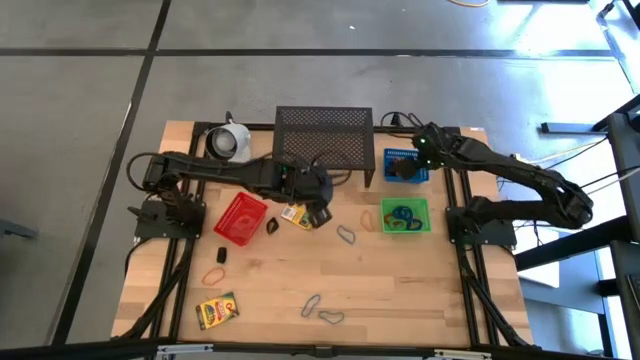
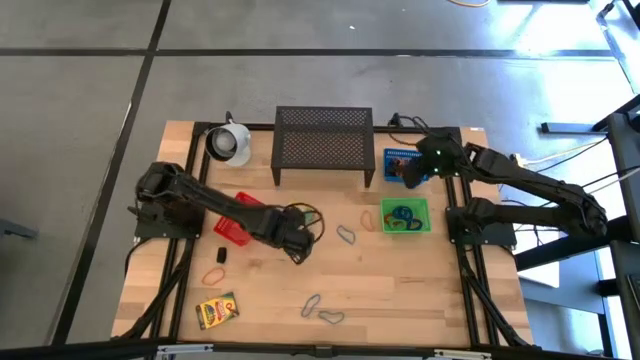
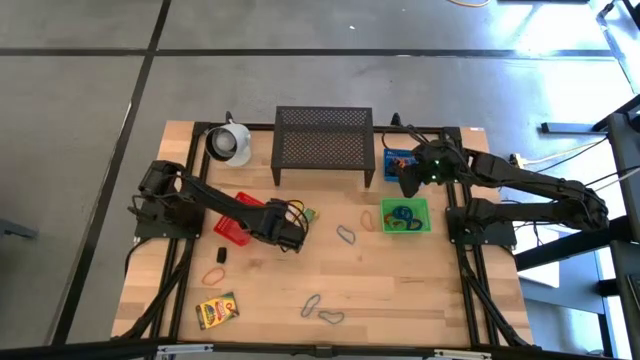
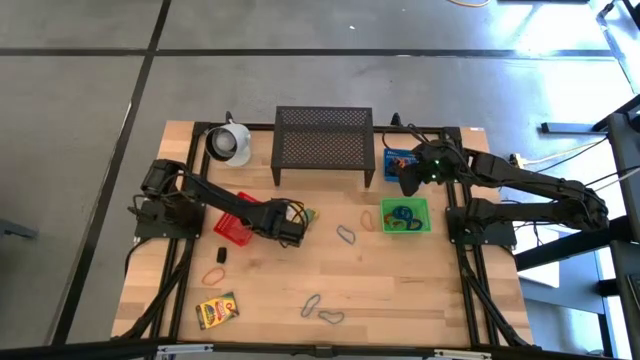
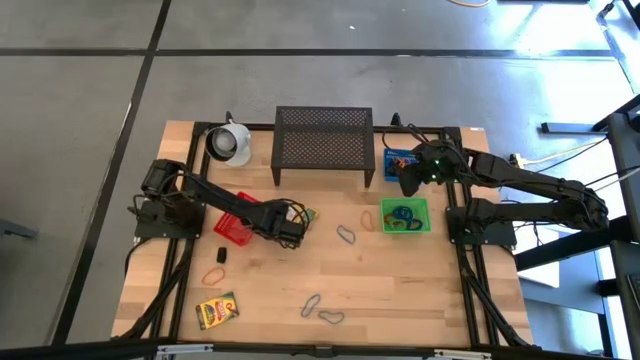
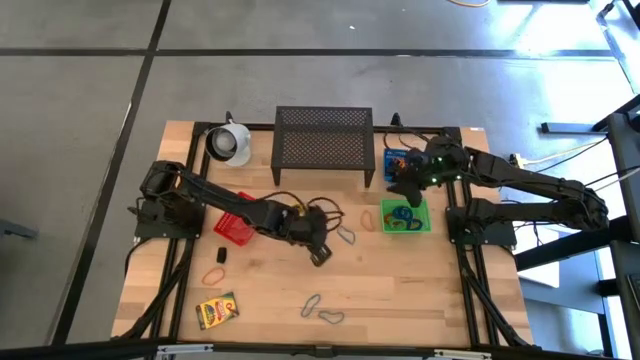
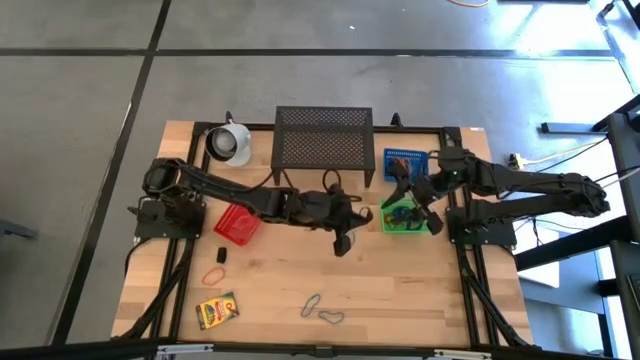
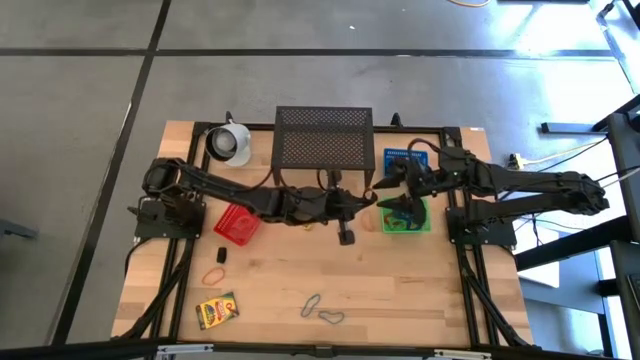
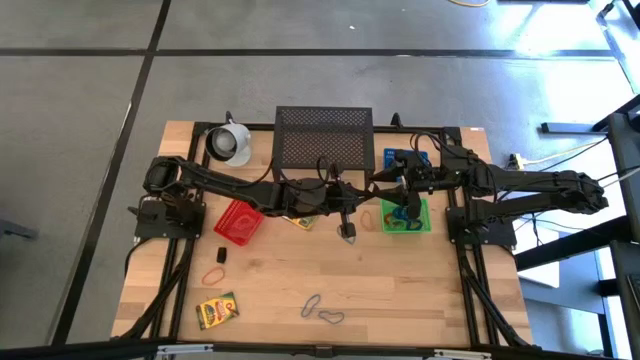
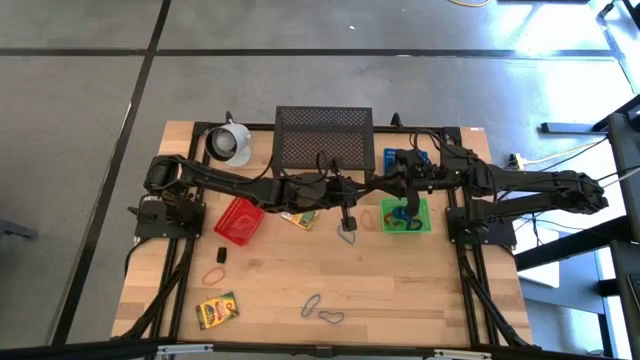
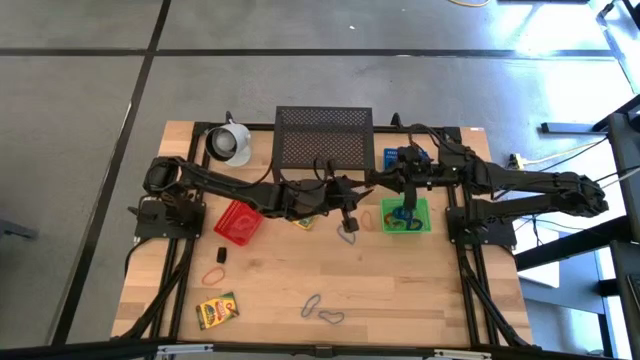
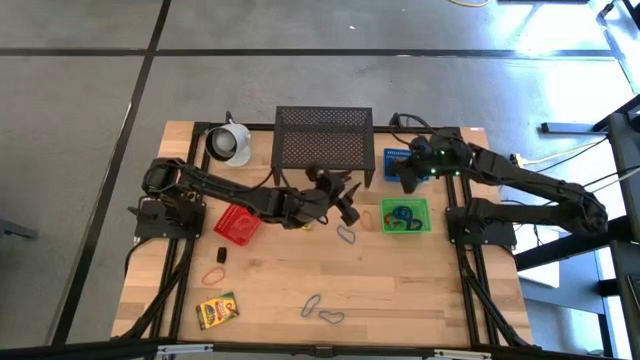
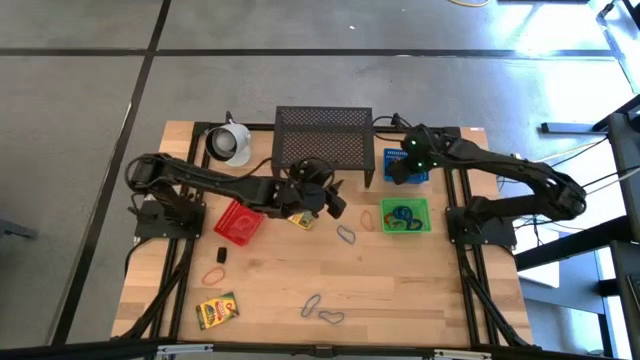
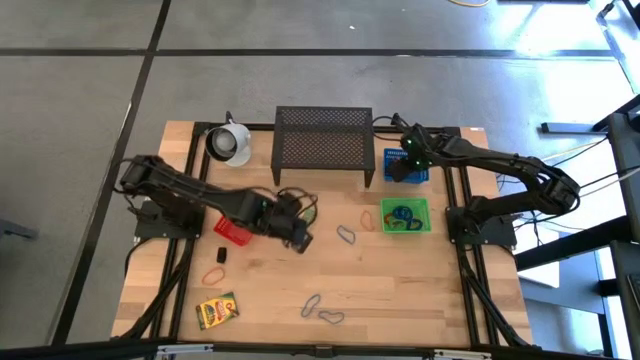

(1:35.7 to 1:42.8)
Task: Pick & Place Office Desk Supplies
Put the black rubber band into the blue bin

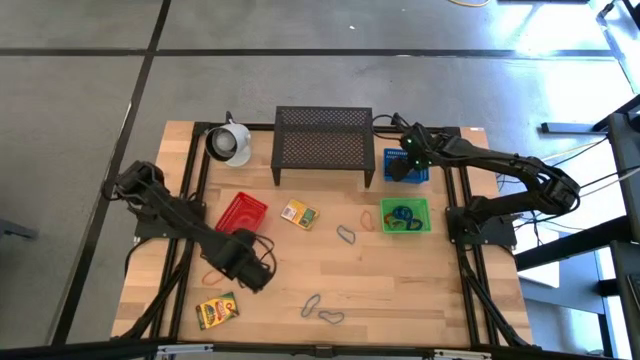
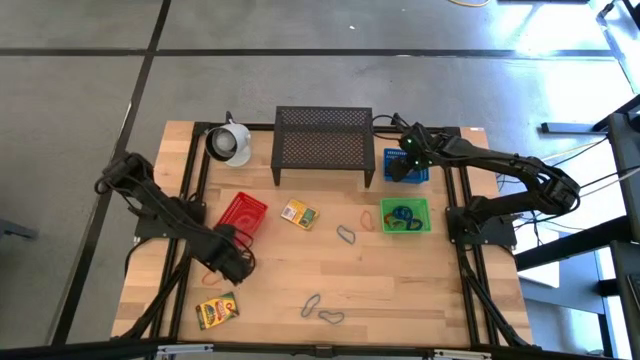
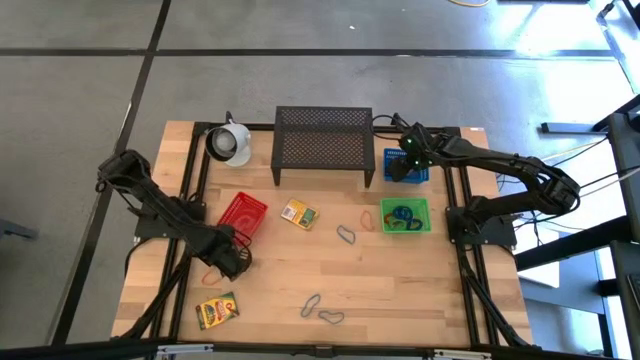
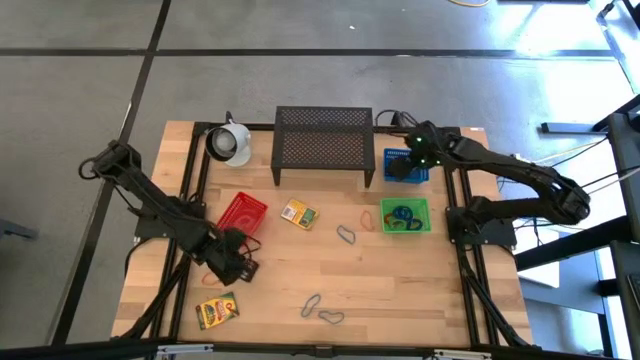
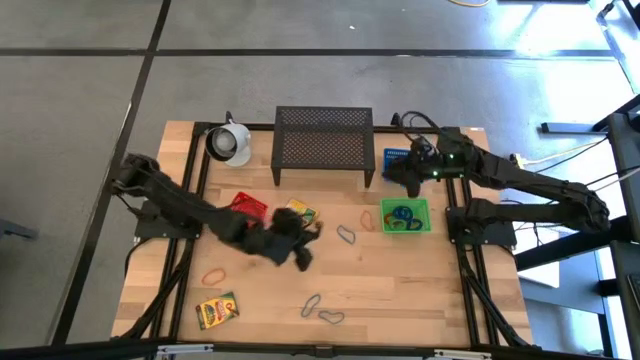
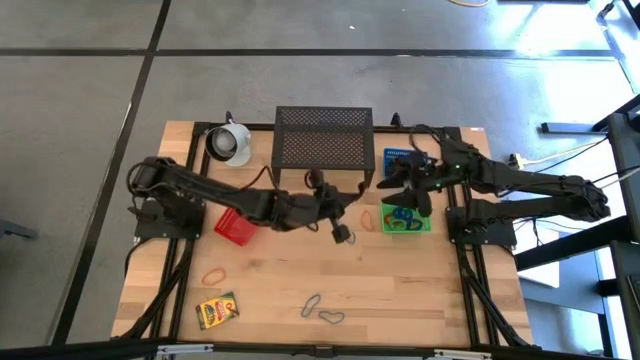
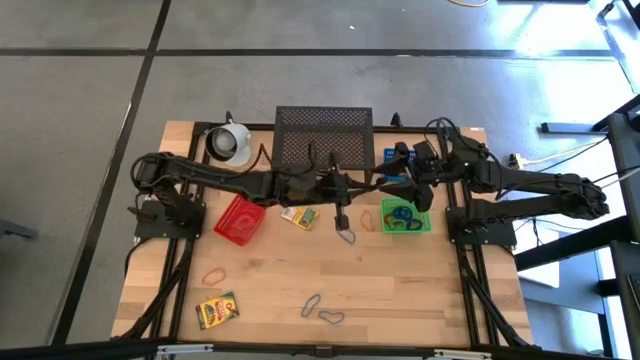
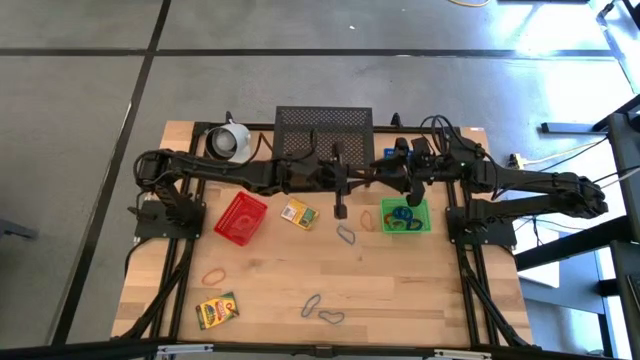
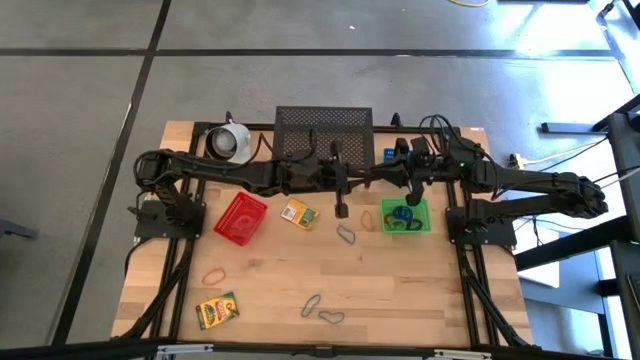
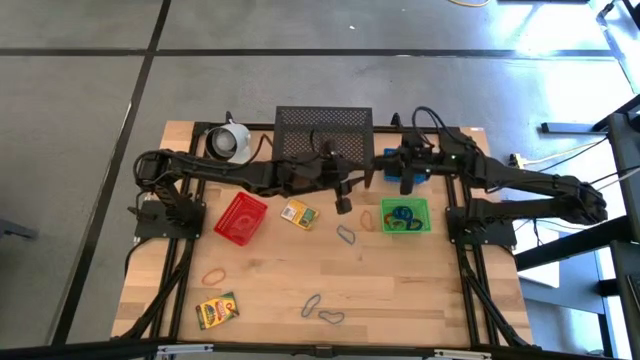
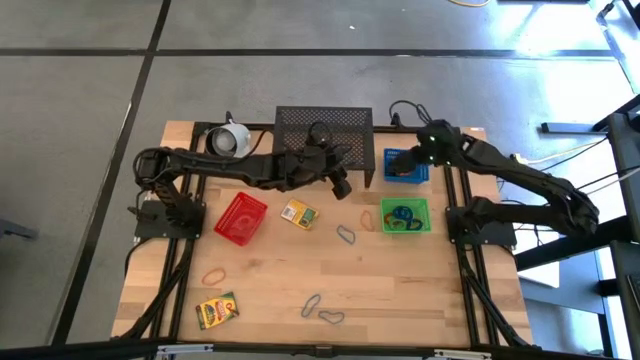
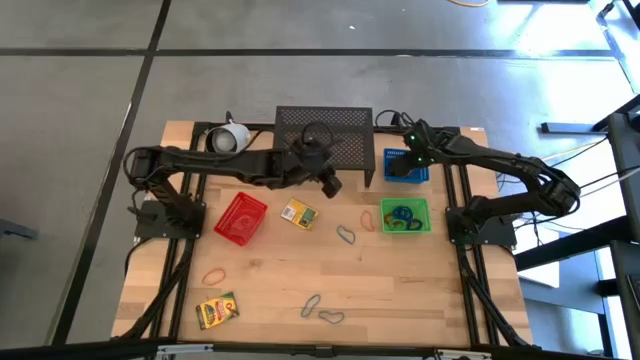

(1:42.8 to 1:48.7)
Put the black rubber band into the blue bin

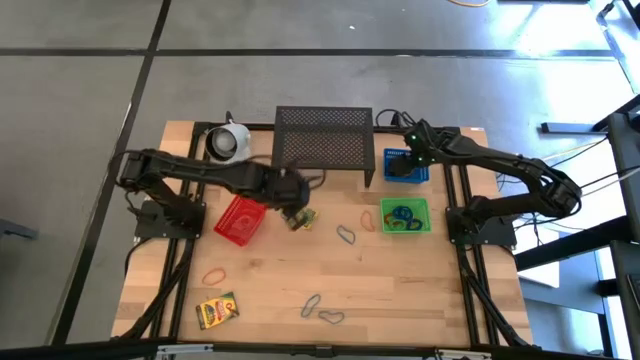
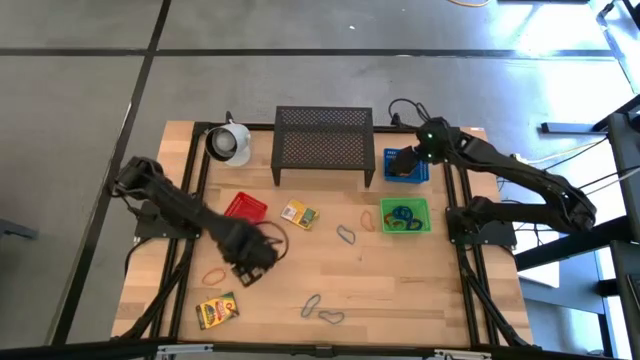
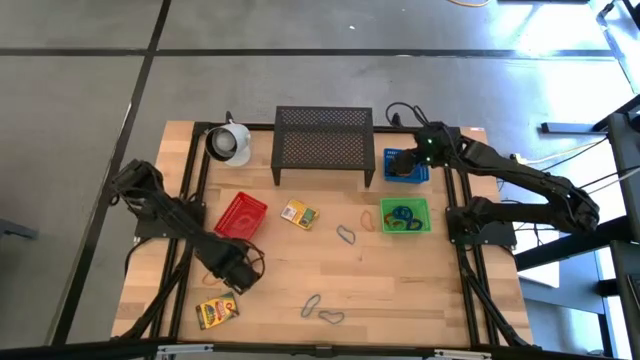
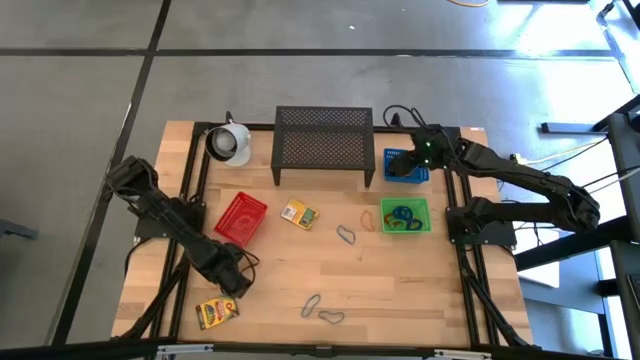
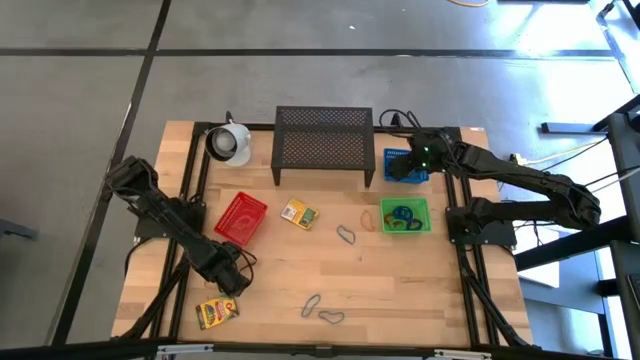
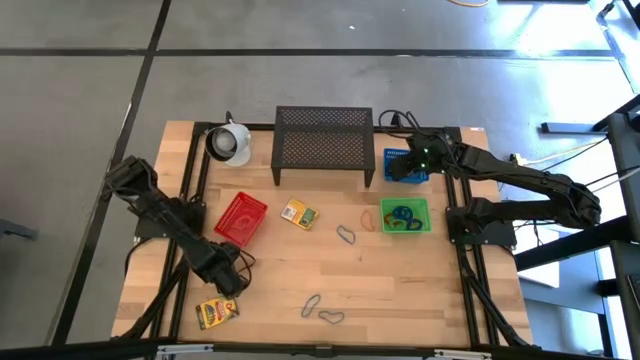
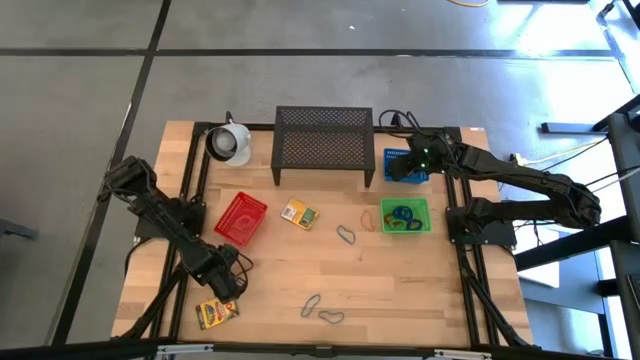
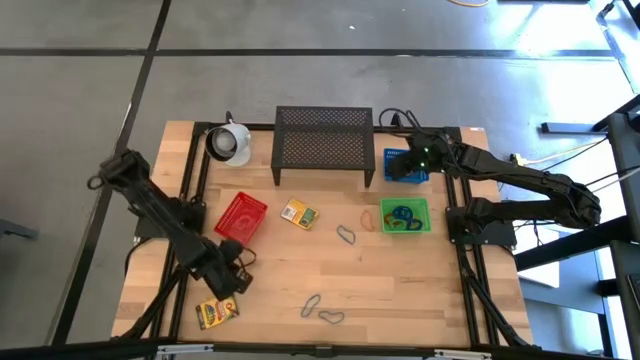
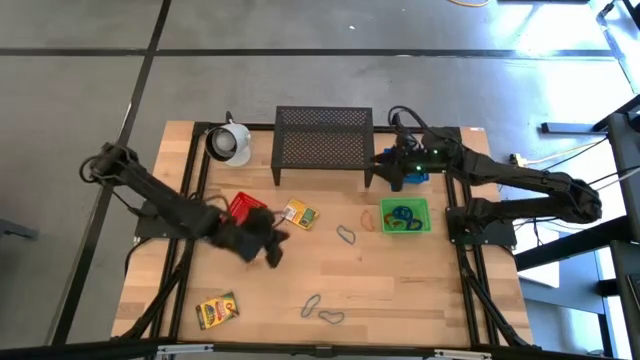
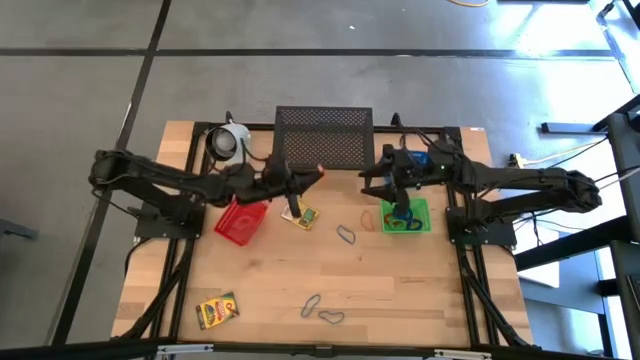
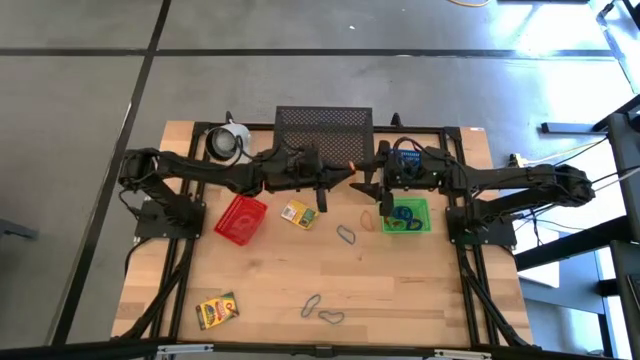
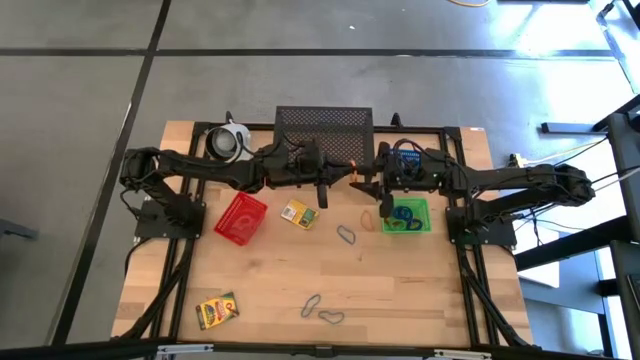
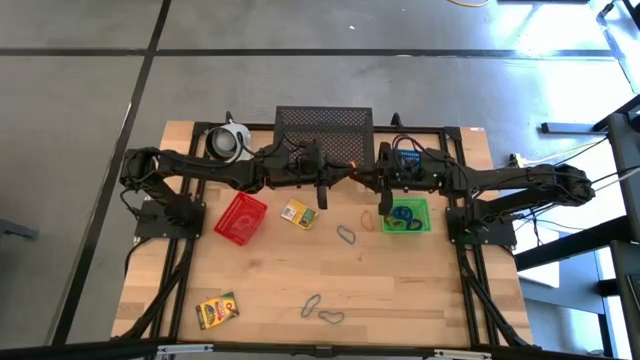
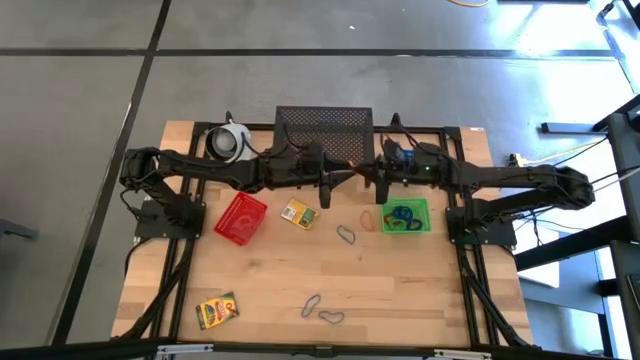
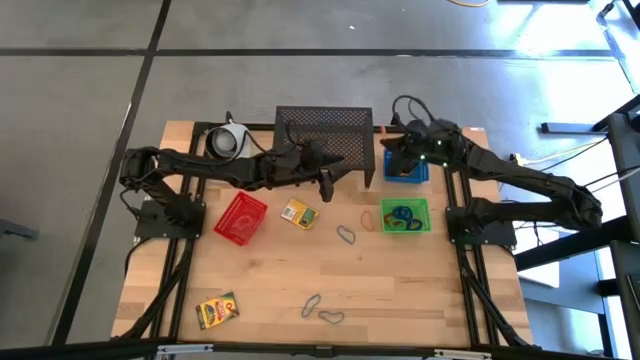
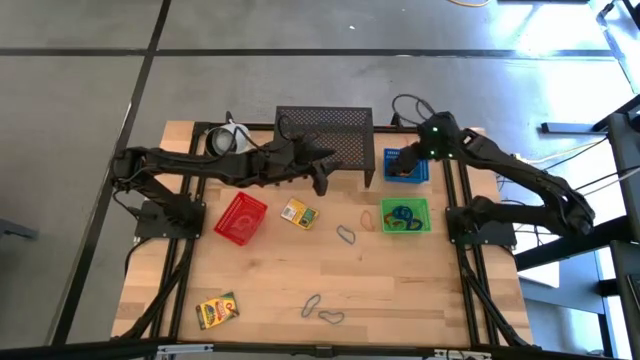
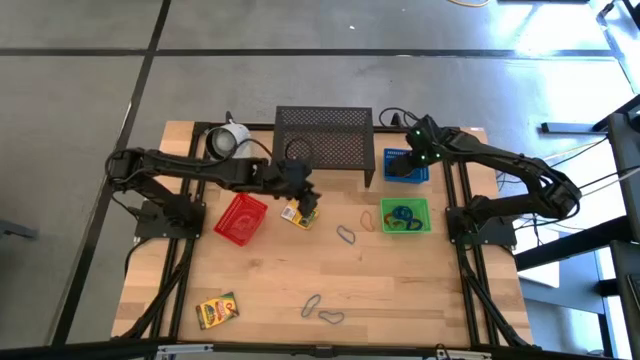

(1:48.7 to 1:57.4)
Put the orange rubber band into the blue bin
